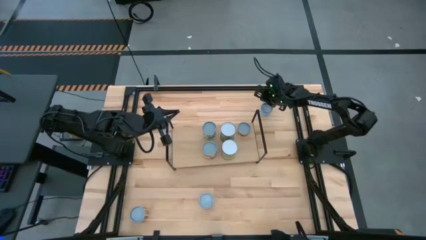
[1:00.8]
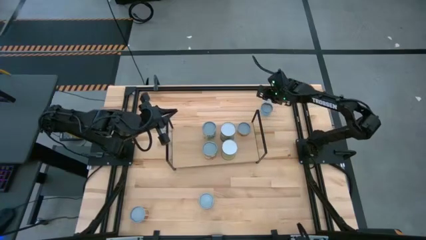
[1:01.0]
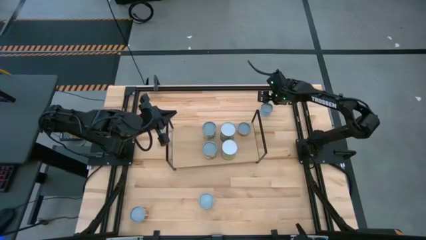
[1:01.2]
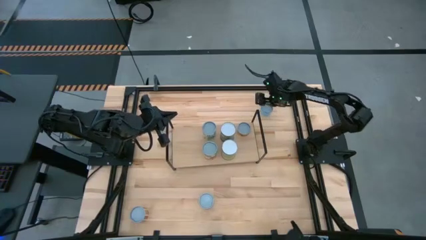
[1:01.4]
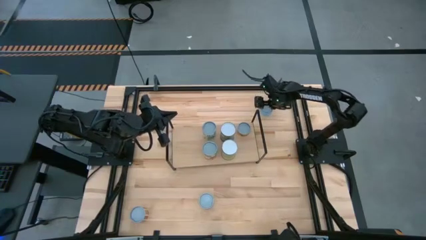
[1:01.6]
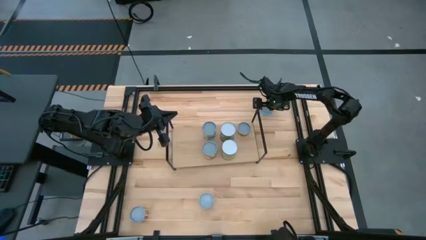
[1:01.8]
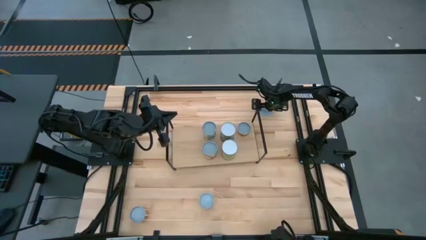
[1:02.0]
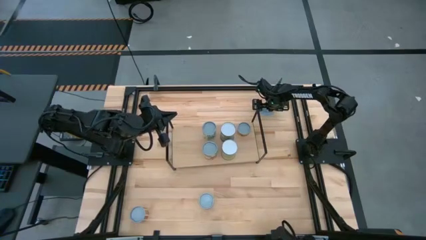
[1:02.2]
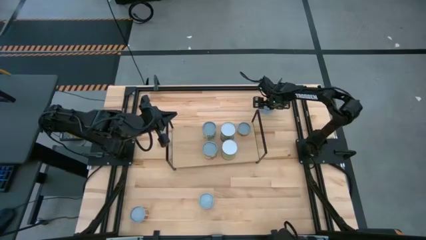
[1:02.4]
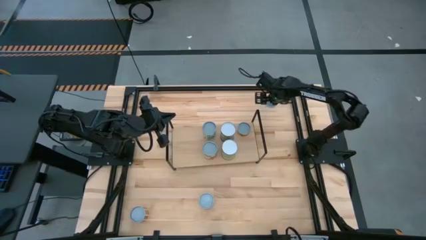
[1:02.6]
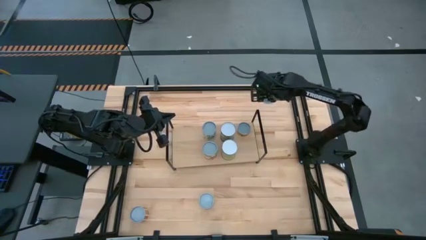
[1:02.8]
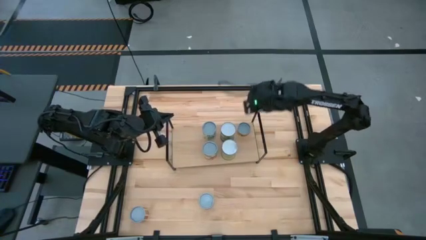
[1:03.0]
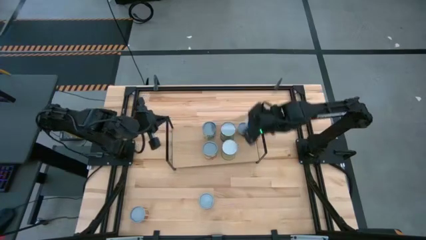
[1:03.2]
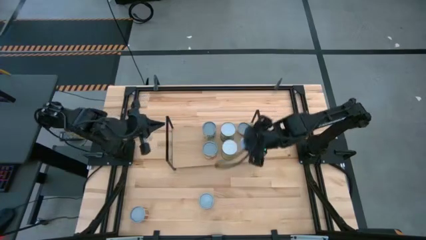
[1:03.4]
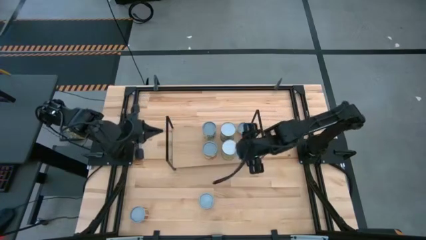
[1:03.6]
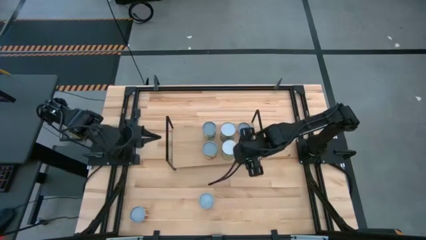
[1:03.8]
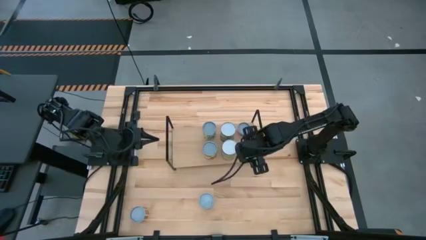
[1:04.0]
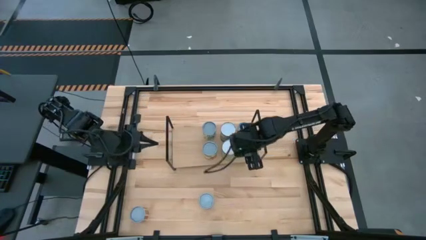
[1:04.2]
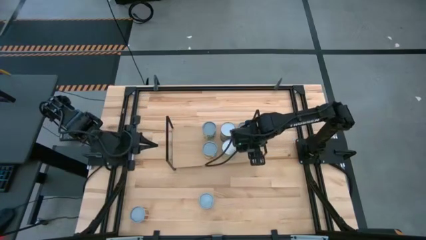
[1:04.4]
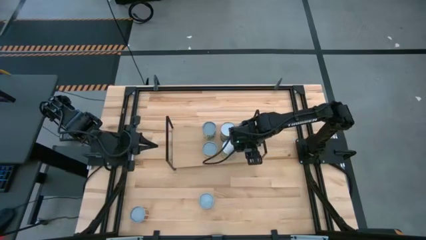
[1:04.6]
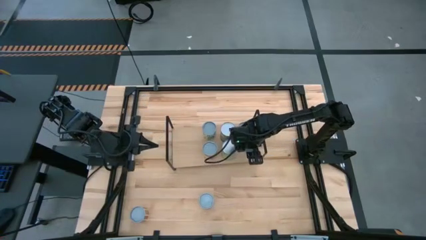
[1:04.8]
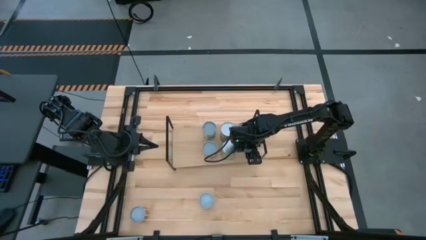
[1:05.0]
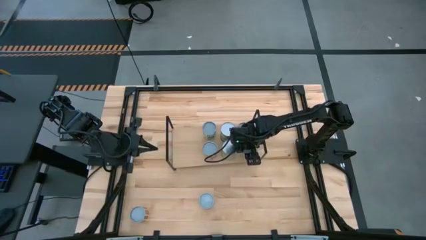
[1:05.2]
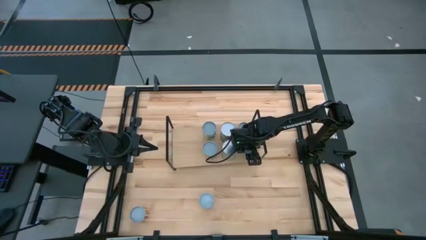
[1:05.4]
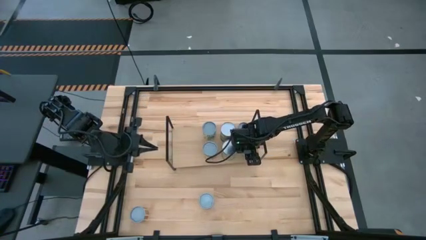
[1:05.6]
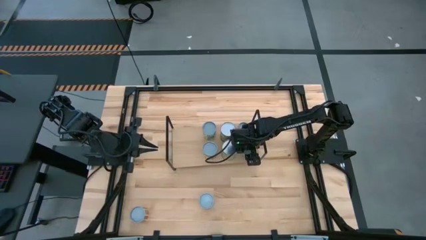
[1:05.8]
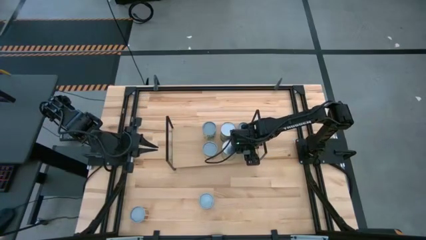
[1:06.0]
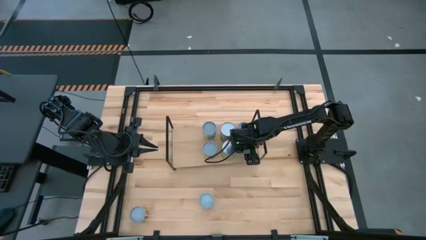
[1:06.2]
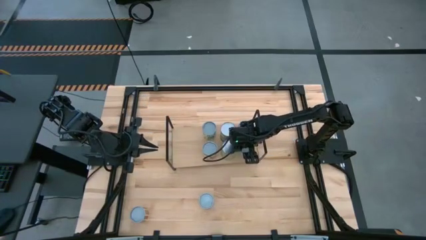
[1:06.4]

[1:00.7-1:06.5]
Task: Pick and place cans onto a shelf
Put the canned tuna on the shelf

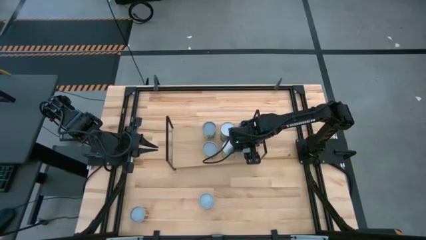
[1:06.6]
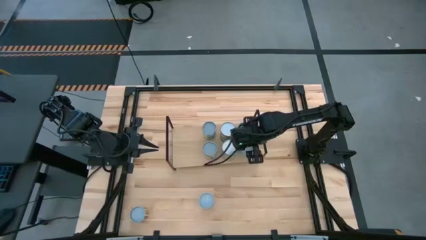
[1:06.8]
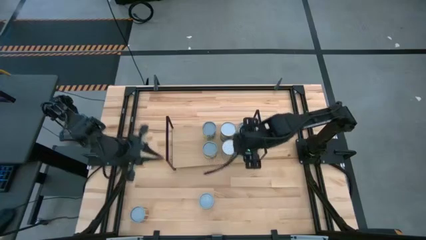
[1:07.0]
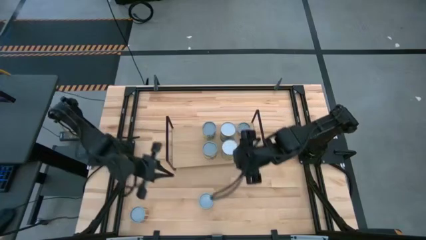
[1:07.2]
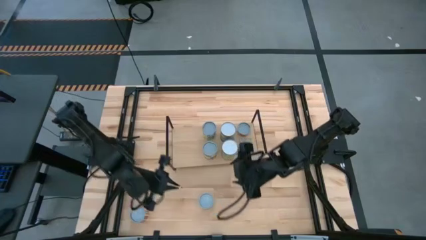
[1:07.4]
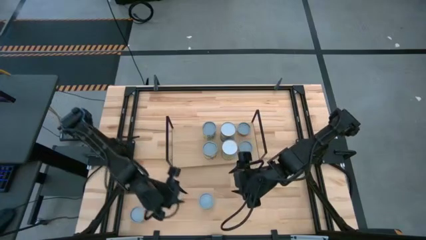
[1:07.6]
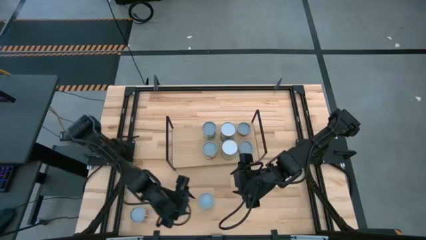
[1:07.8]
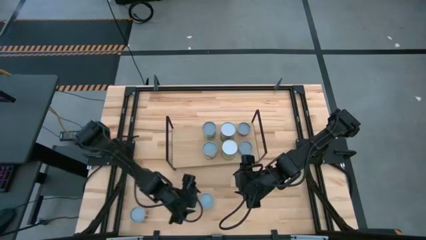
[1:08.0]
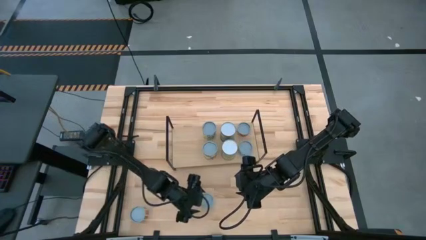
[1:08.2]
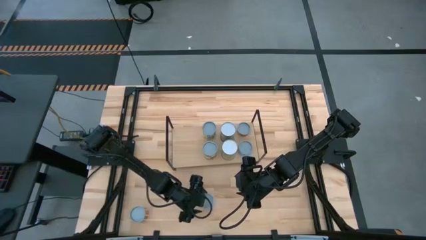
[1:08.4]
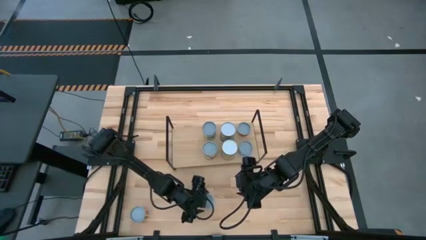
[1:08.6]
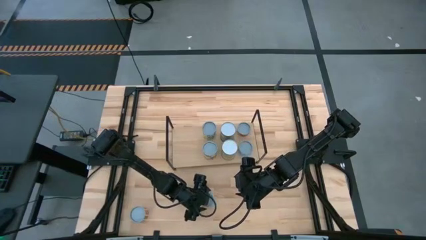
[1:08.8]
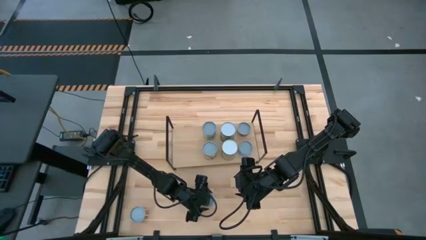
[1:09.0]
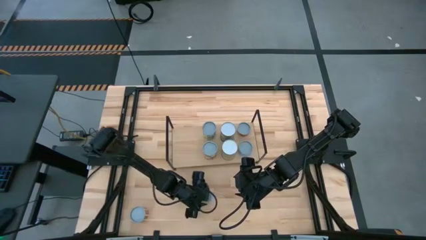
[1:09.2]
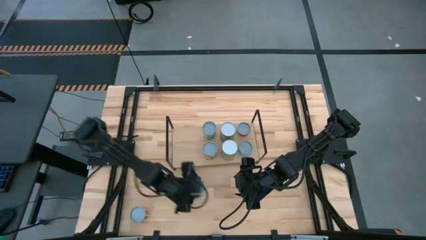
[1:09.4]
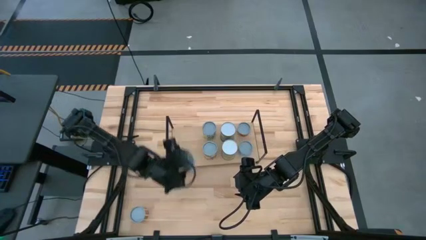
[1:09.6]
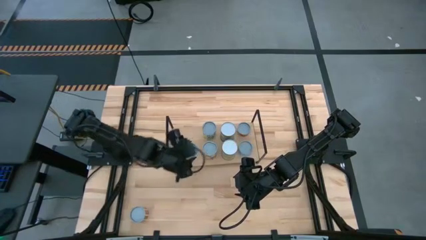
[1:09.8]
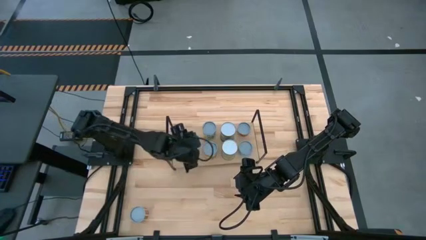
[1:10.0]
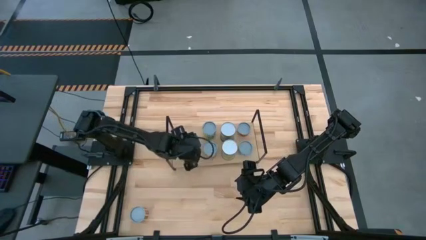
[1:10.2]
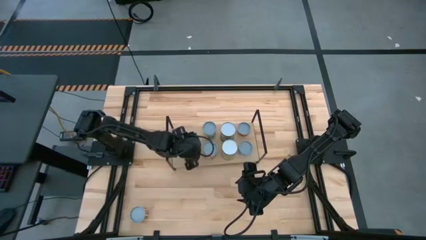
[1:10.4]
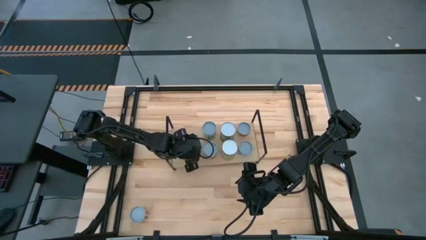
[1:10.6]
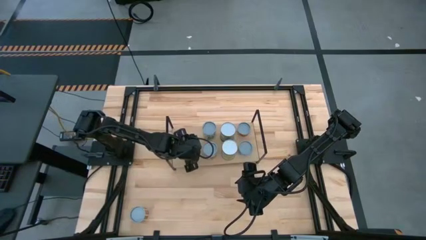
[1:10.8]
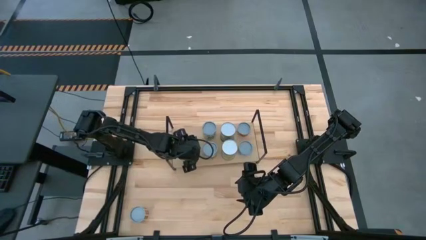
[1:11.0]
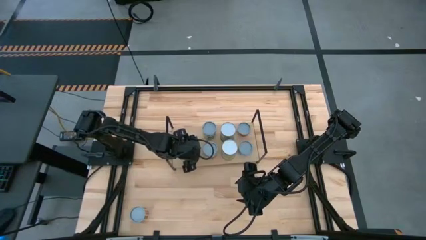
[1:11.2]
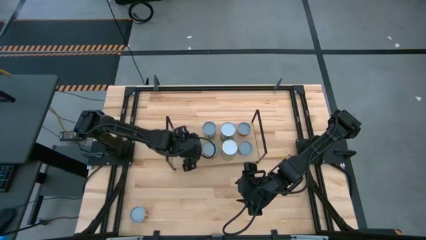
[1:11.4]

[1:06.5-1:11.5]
Put the canned peaches on the shelf

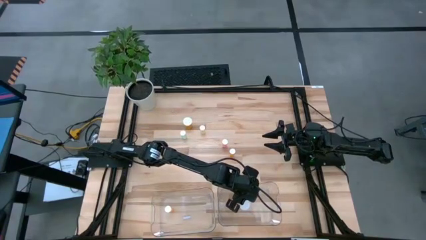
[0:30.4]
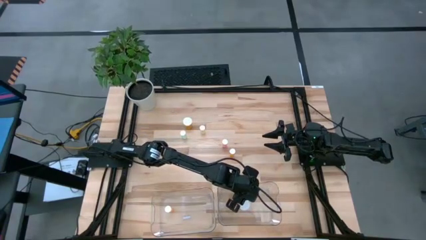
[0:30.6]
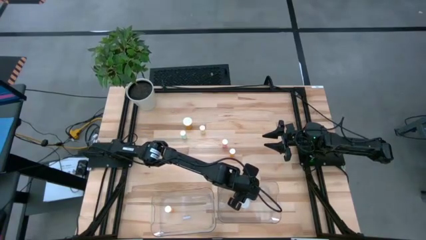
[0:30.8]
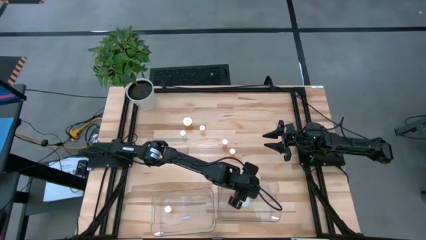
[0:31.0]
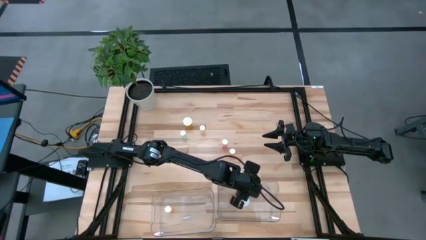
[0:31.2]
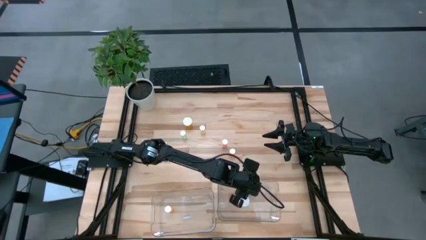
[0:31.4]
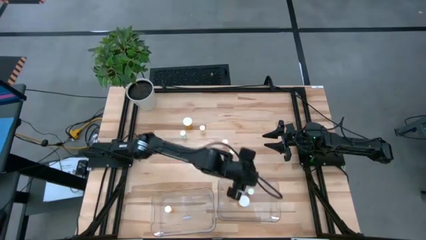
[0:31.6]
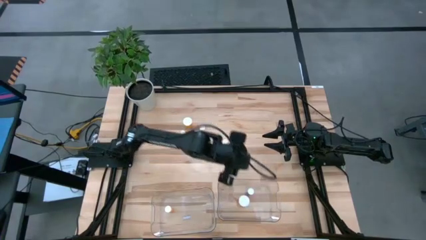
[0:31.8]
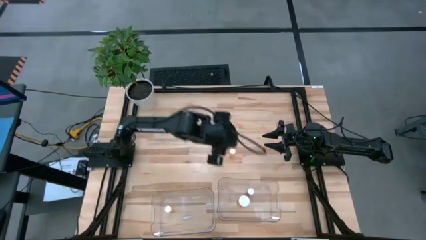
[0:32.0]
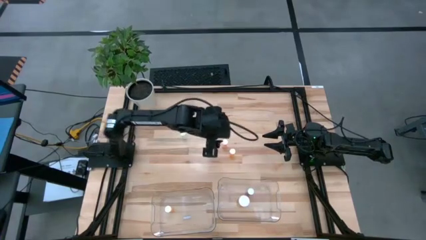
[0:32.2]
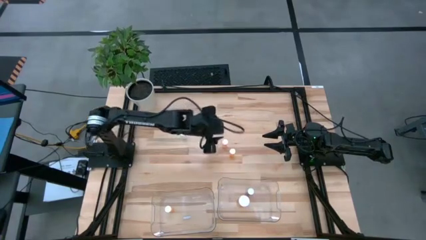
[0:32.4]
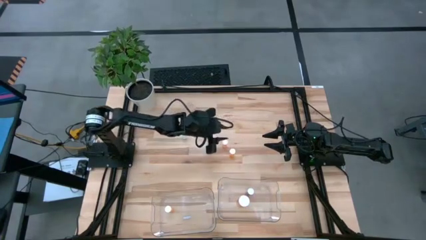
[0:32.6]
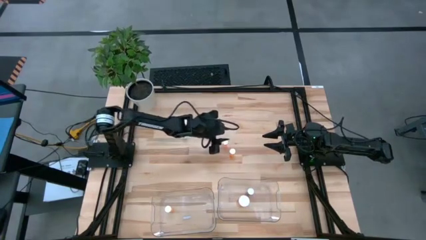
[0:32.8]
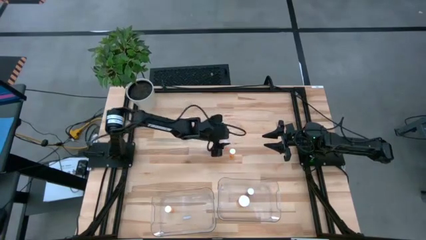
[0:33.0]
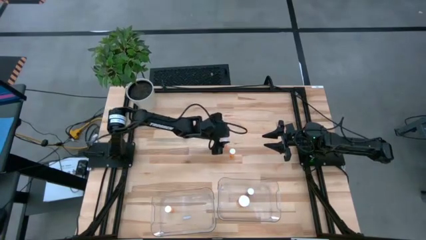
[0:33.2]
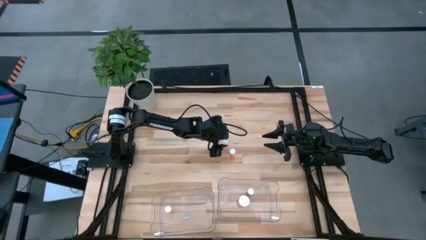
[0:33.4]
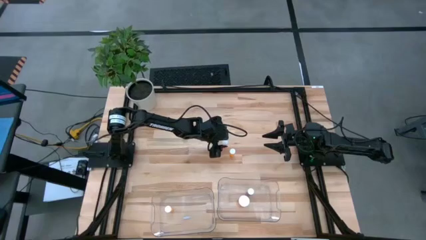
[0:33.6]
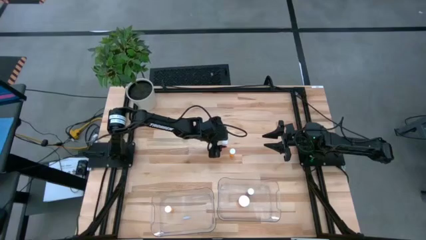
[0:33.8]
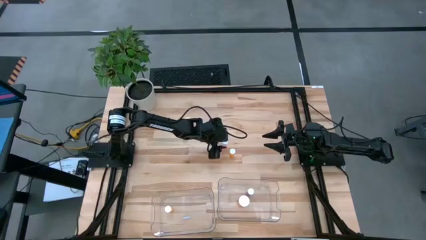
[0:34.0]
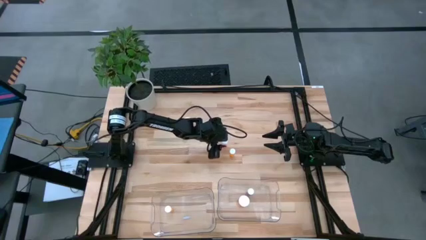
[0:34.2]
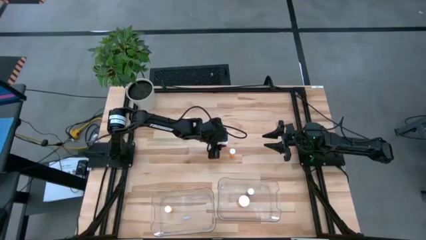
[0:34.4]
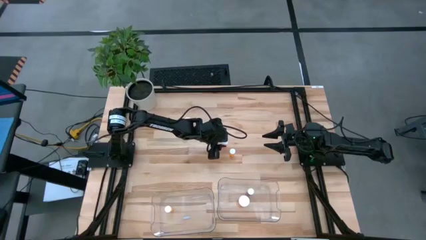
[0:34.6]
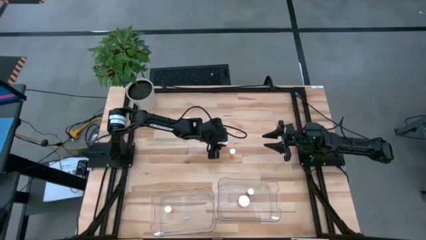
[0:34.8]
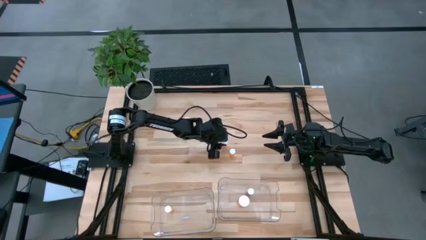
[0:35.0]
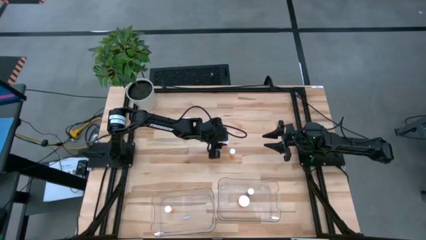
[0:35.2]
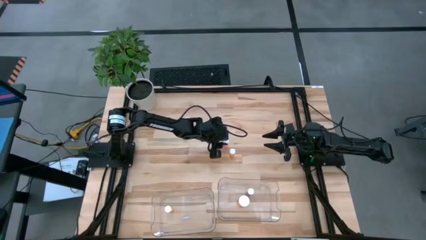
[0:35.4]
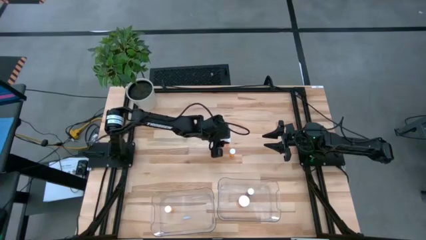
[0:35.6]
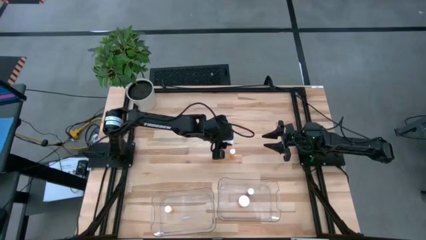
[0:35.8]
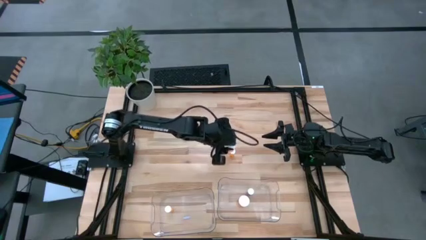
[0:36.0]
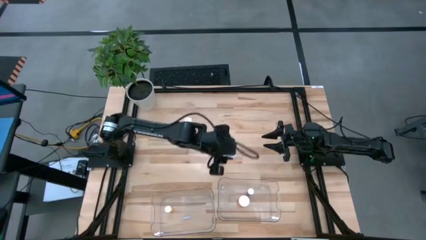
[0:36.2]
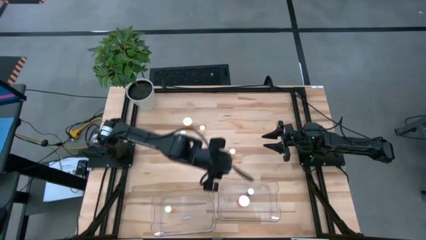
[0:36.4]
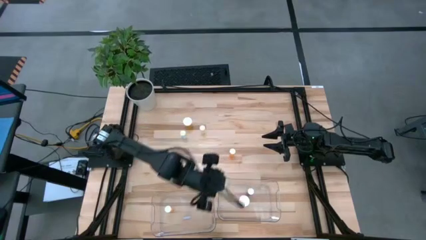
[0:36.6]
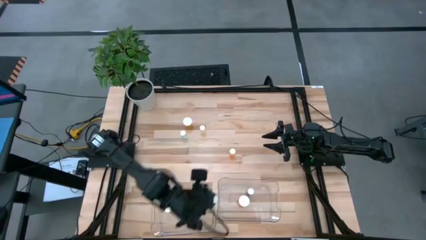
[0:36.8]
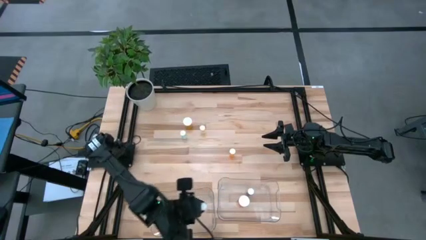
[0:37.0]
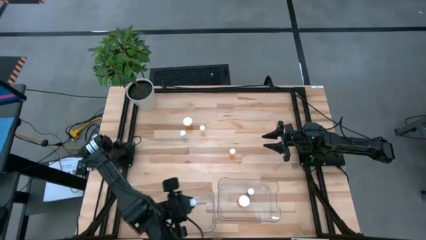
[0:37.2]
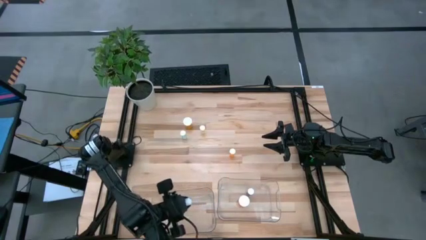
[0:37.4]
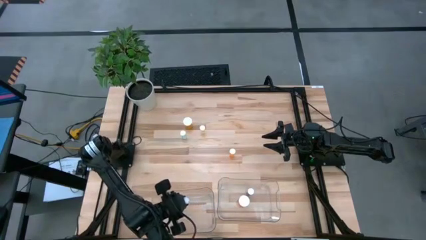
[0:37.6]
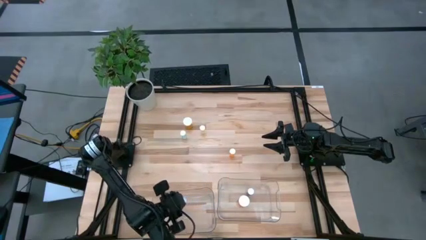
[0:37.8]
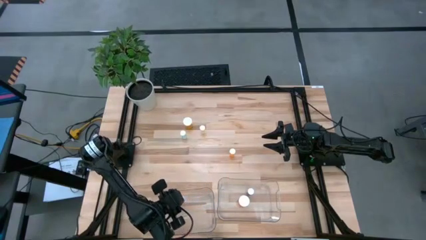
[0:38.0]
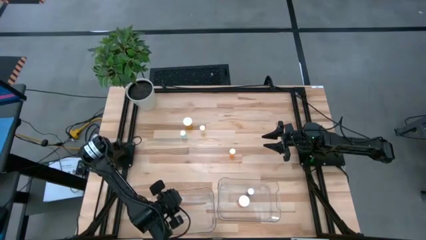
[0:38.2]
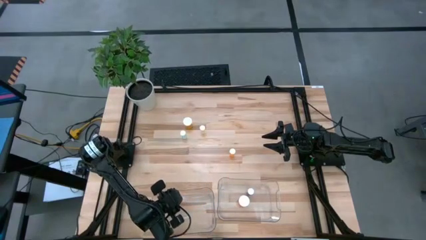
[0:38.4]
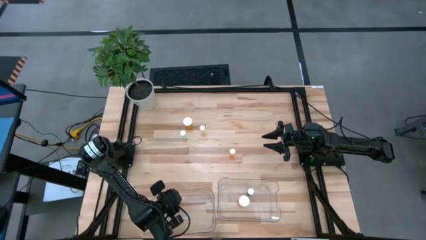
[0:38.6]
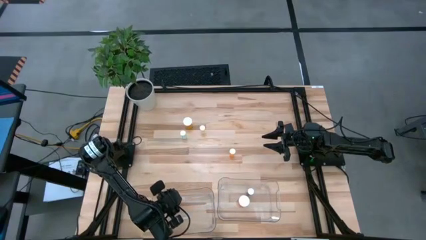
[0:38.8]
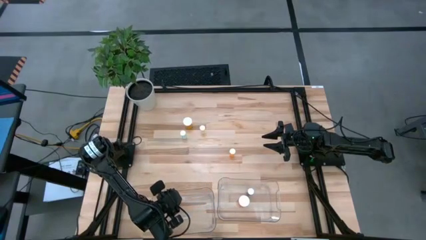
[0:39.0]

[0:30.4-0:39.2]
Task: Pick and place medicine bottles into bin by pill shape (circle, oval)
Put the pink tablet bottle into the left transparent bin
